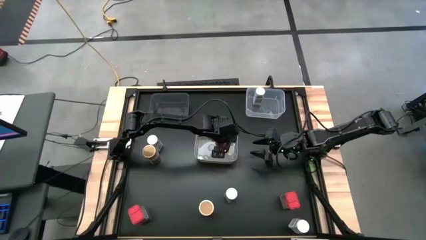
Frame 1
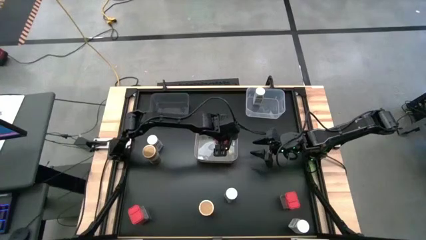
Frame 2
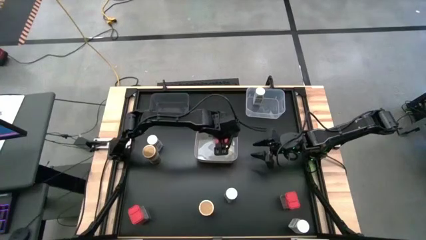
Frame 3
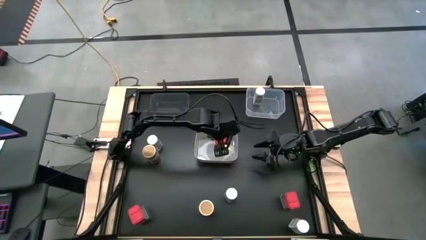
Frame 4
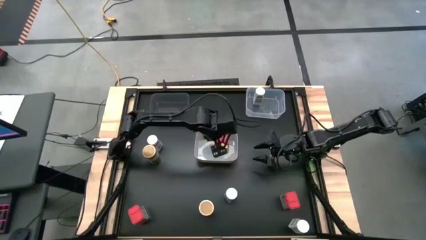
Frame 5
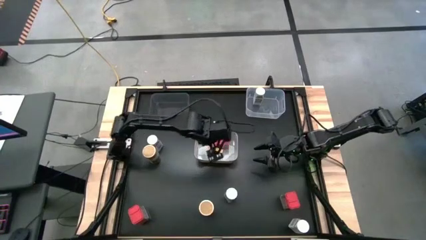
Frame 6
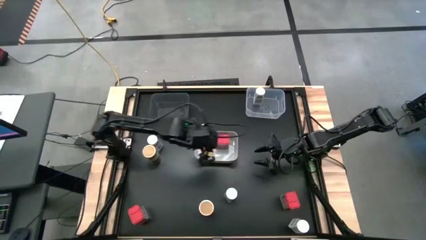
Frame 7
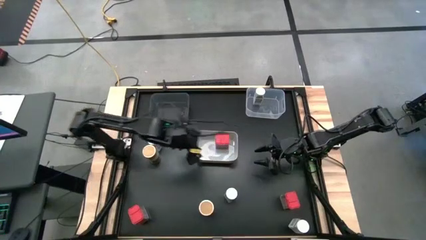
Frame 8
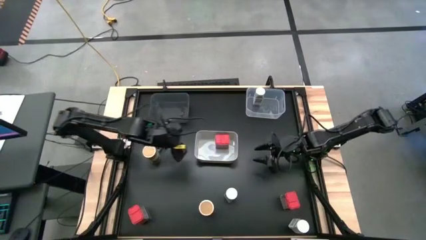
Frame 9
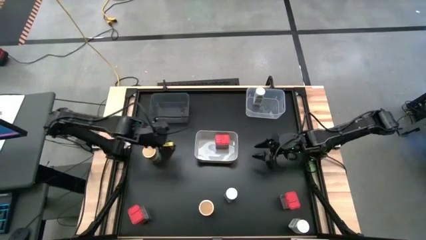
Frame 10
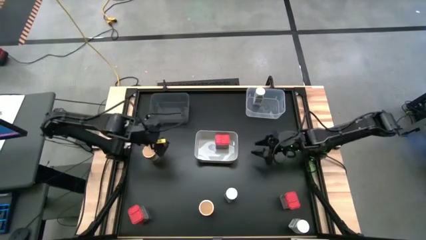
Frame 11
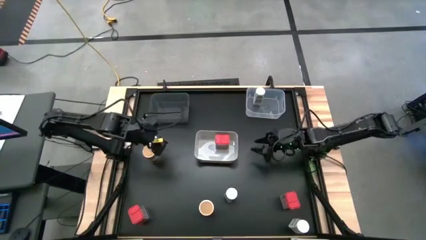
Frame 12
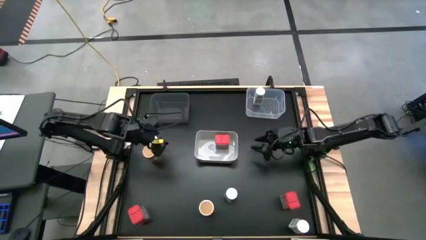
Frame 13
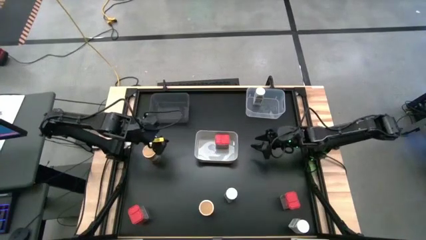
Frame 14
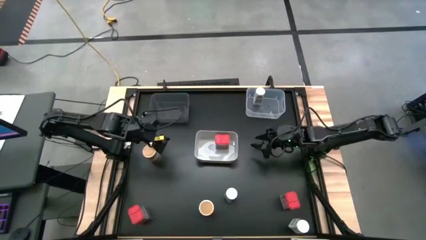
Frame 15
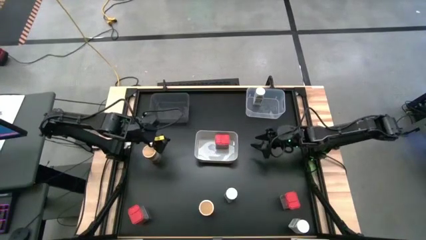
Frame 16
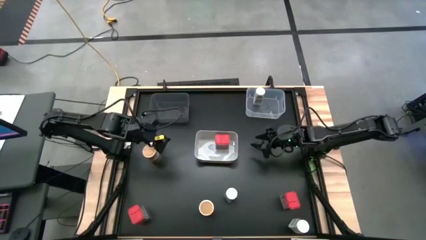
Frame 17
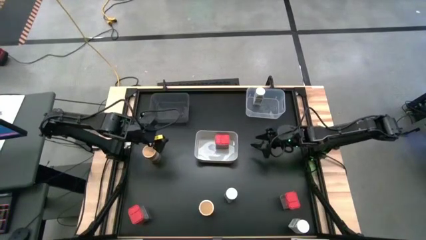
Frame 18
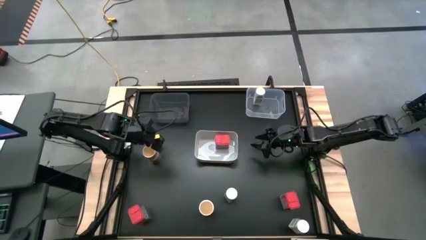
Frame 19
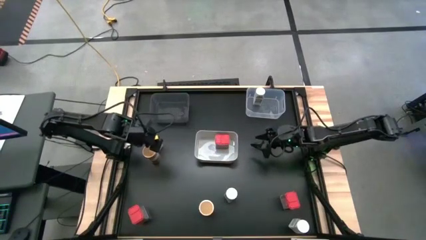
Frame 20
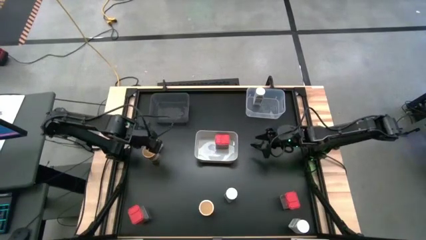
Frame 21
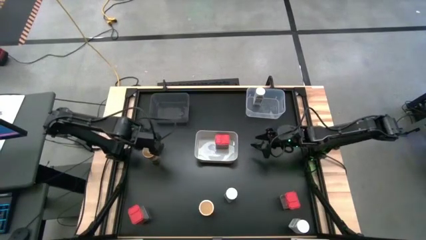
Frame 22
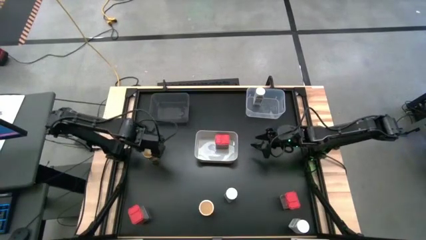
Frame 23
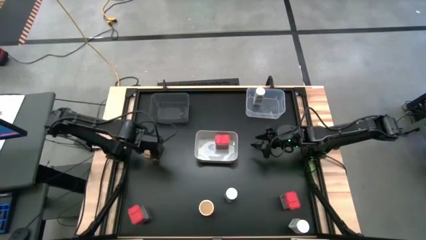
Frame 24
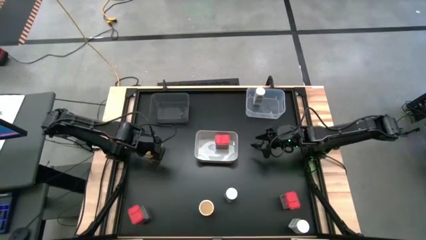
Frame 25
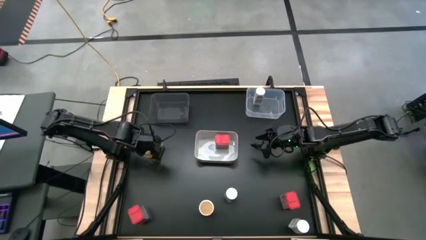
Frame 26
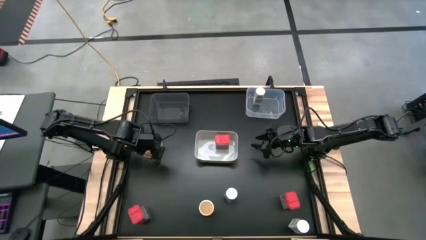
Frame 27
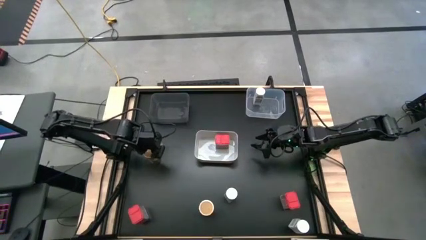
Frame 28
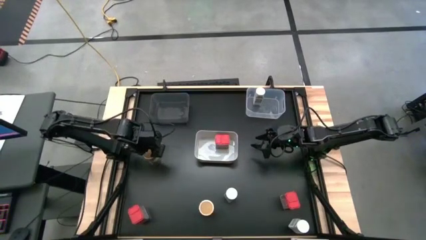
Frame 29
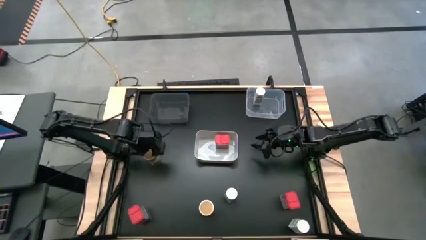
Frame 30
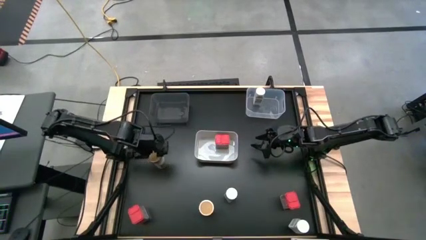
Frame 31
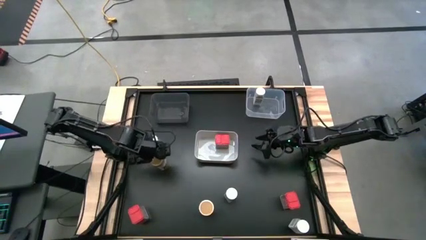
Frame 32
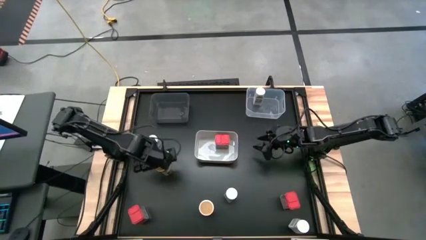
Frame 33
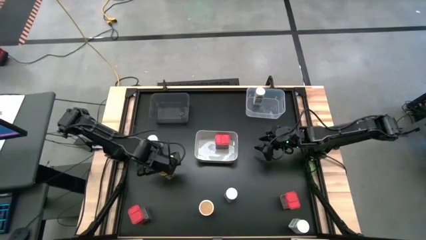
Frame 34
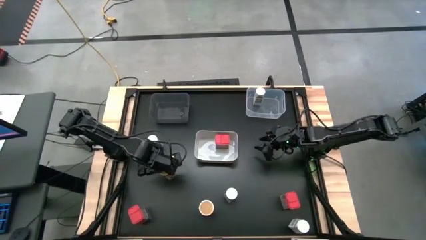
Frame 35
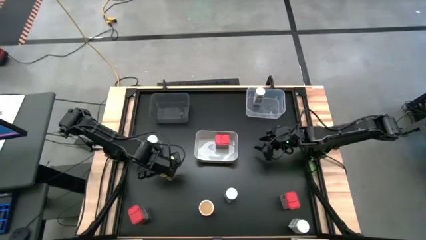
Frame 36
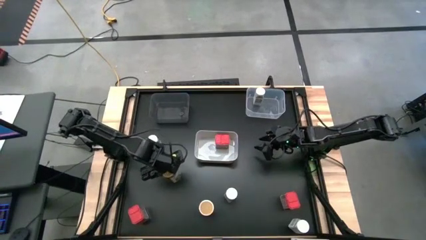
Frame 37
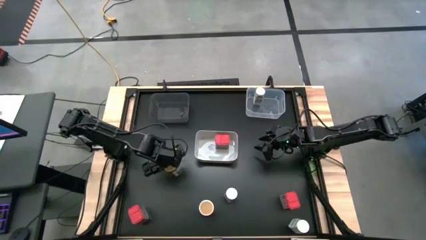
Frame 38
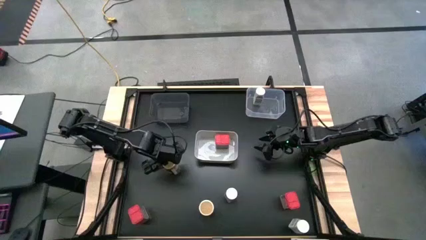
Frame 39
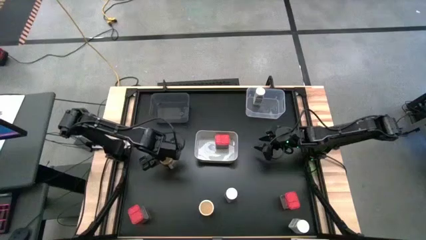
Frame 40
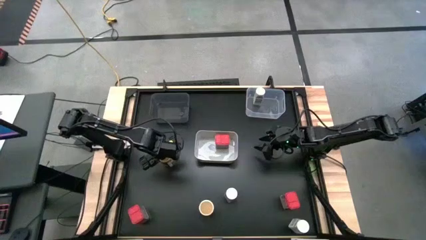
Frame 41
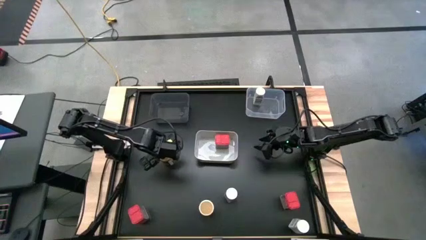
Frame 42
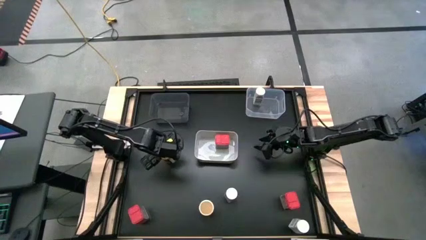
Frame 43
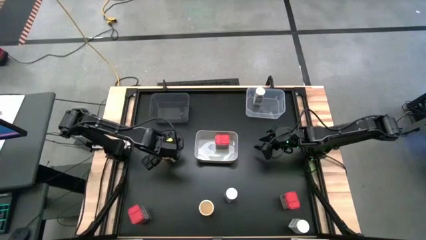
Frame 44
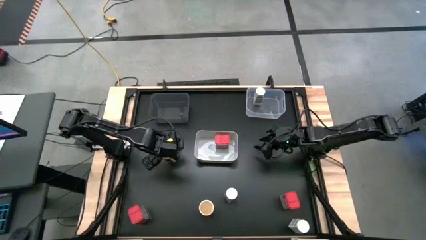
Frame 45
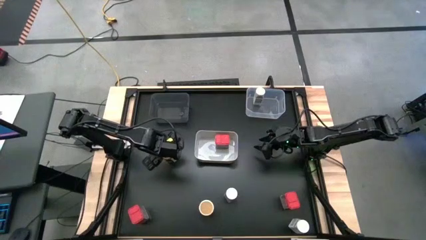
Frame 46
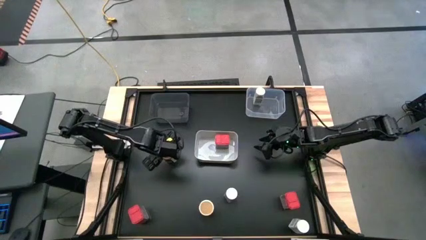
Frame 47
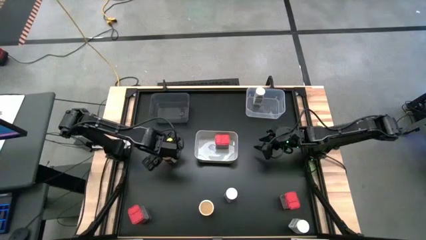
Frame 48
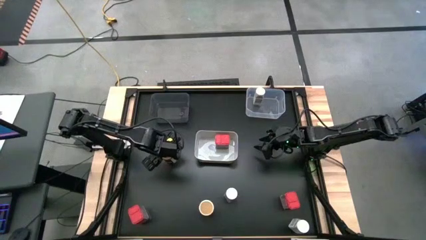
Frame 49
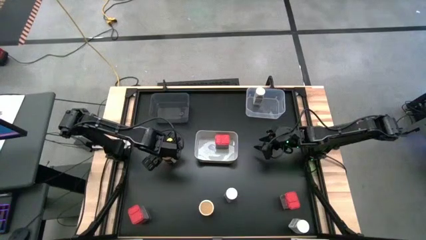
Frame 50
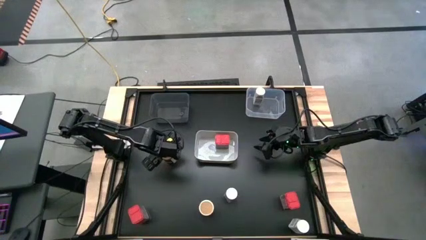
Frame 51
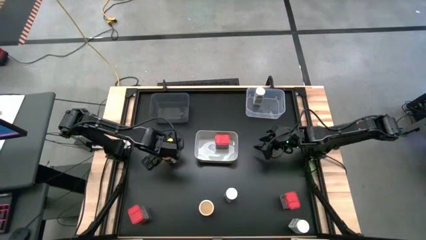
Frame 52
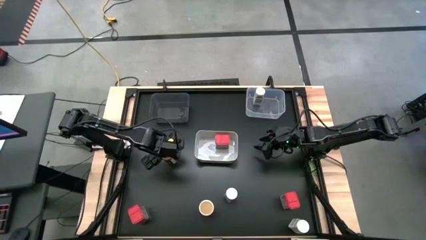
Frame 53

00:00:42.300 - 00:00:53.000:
Task: Sort spices by type
Put the golden seasoning bottle into the black bin

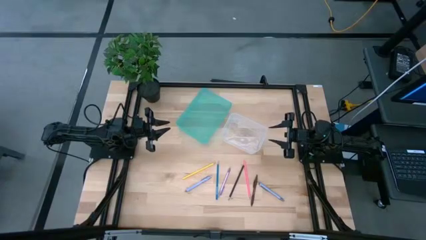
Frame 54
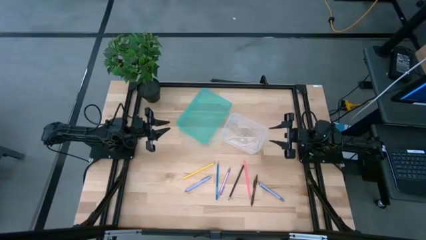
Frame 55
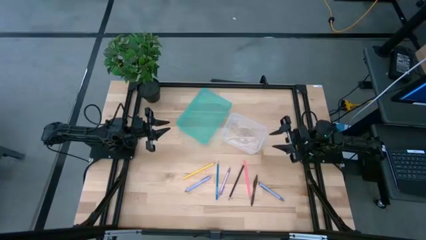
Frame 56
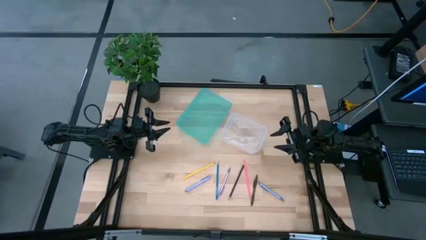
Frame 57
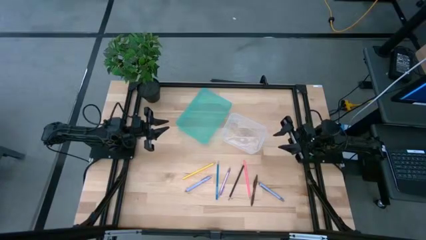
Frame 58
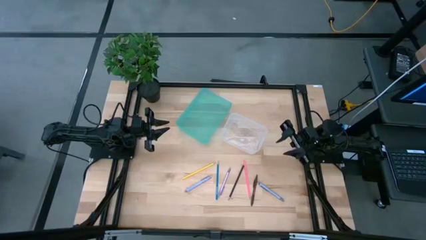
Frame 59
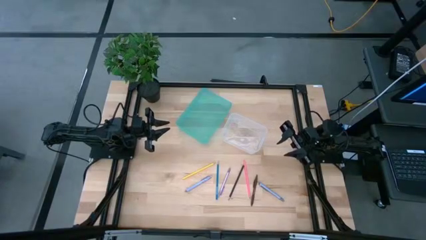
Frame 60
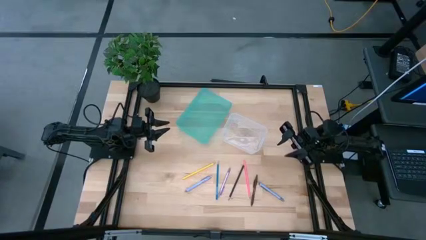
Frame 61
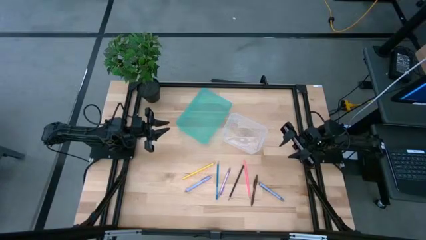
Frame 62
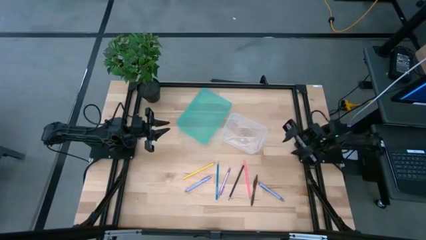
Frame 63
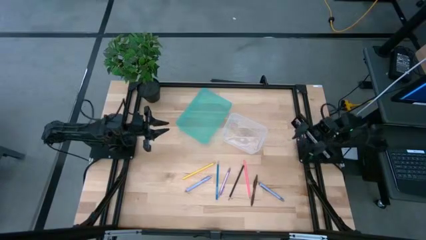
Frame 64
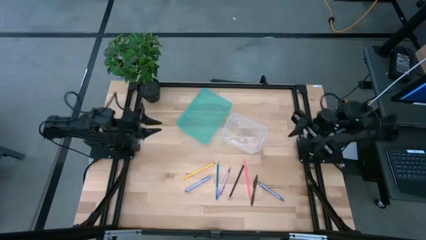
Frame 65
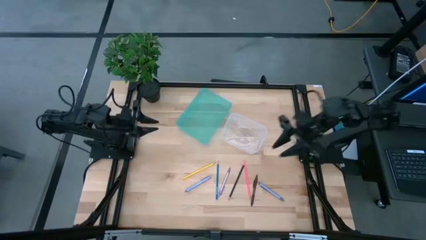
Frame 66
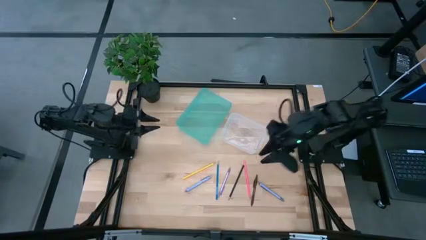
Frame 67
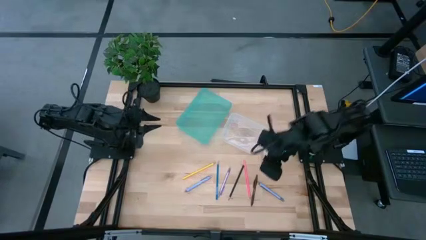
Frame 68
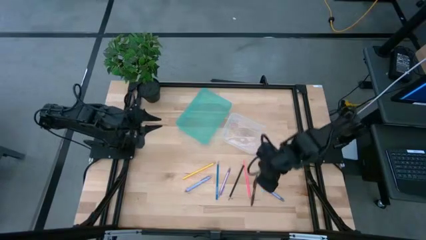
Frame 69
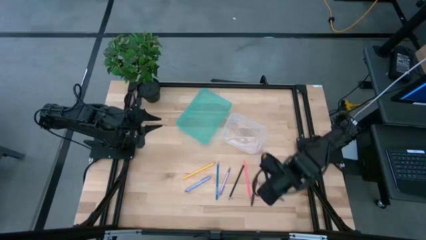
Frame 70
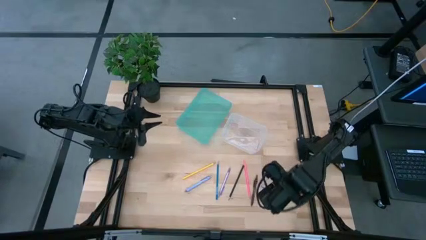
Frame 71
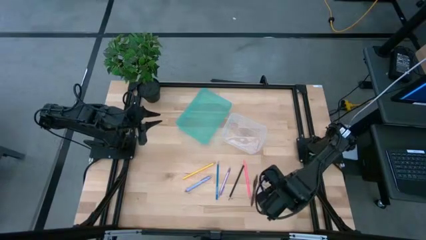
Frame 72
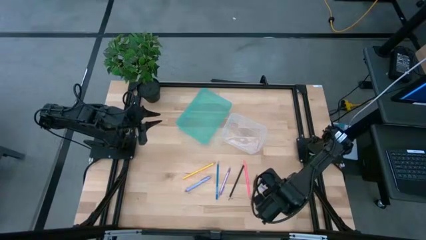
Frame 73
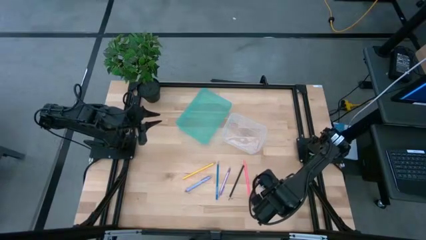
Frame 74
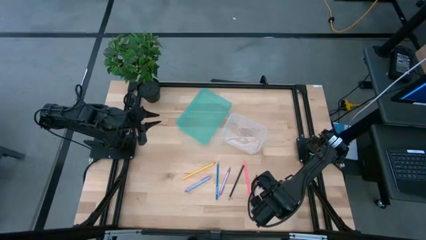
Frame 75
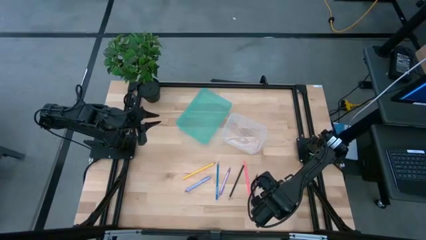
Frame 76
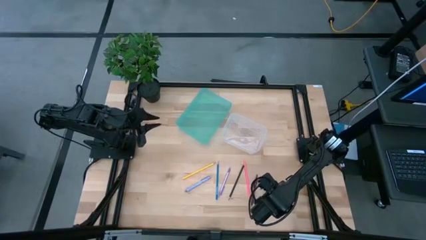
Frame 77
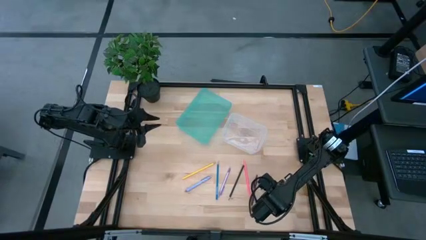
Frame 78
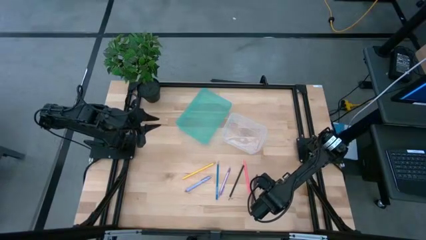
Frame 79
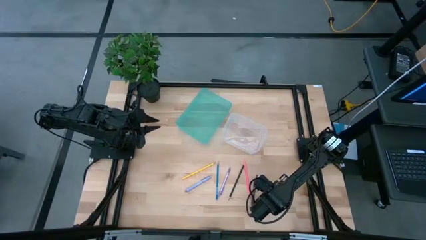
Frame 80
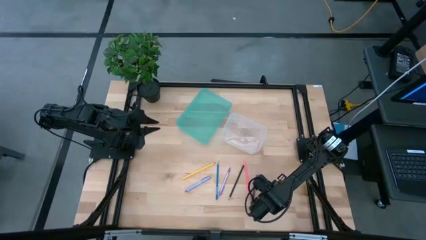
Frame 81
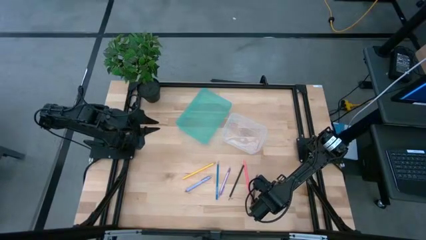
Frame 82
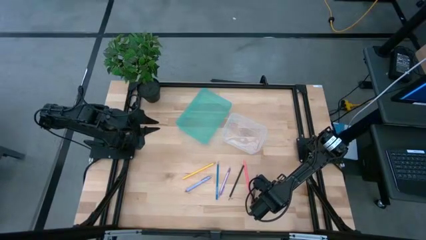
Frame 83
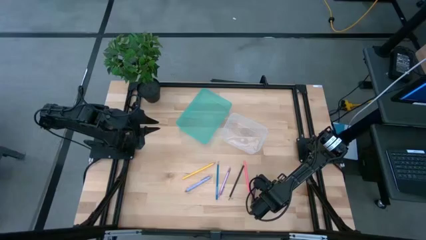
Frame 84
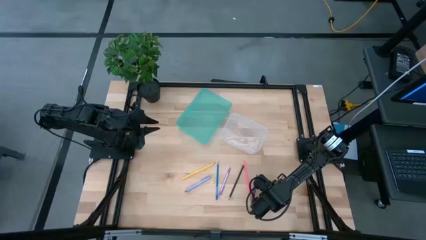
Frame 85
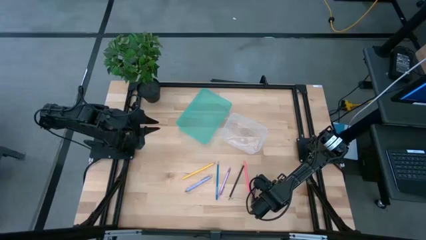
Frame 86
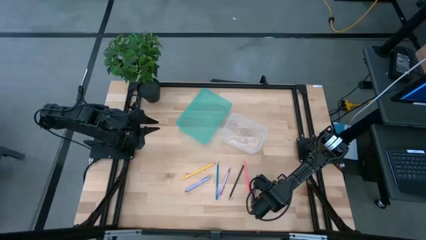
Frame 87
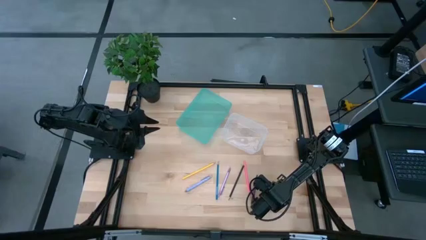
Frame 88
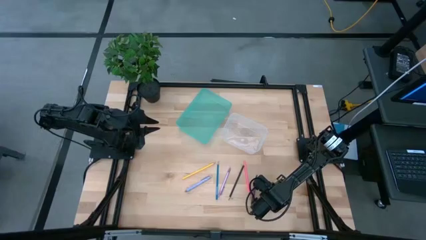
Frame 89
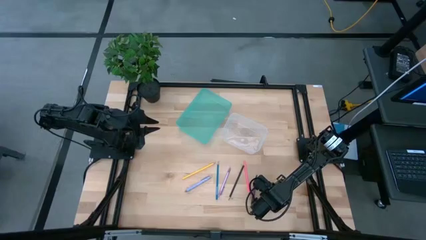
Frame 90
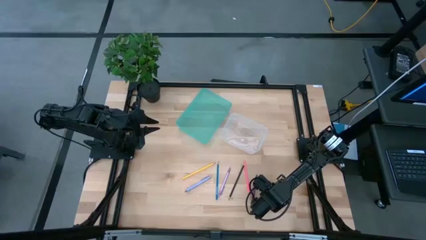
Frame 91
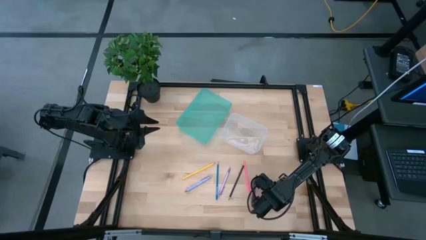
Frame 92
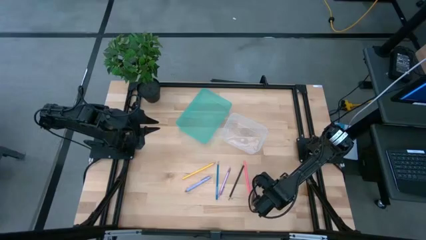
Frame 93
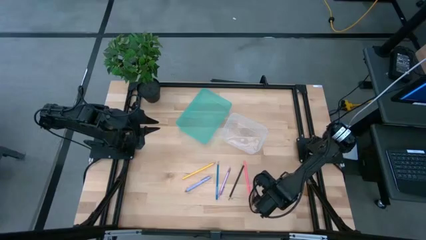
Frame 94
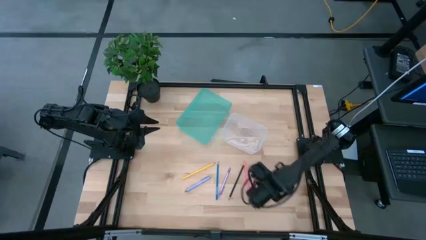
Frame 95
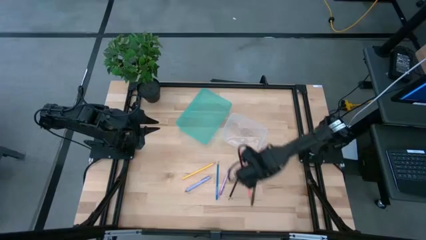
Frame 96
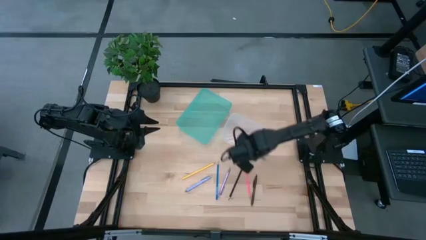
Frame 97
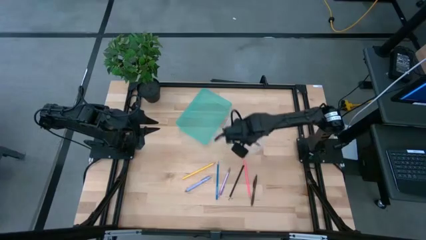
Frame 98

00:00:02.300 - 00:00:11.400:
Task: Sort pens & pencils
Put the right light blue pen into the transparent bin
